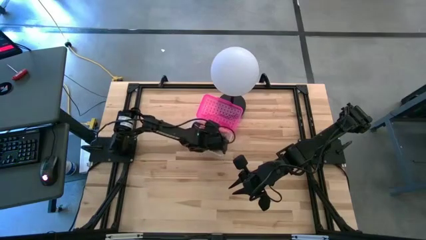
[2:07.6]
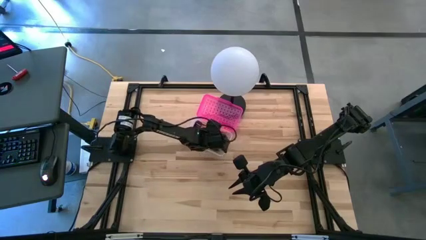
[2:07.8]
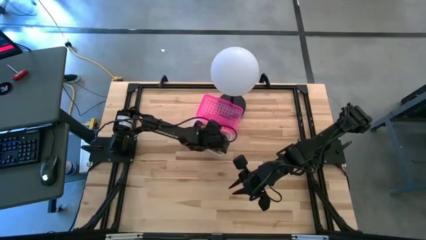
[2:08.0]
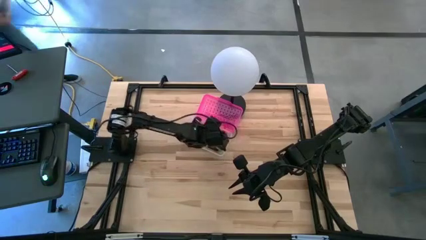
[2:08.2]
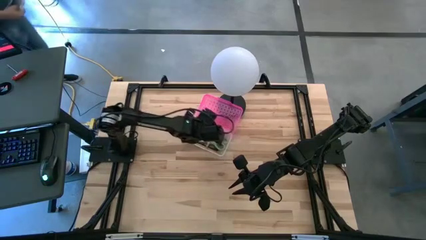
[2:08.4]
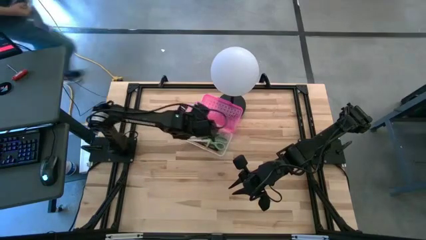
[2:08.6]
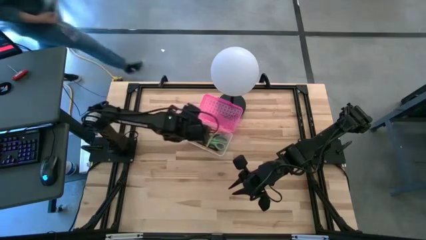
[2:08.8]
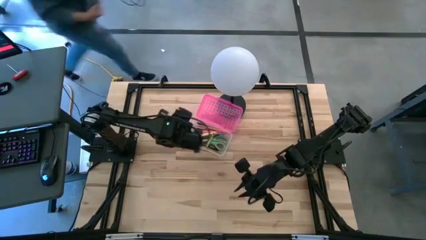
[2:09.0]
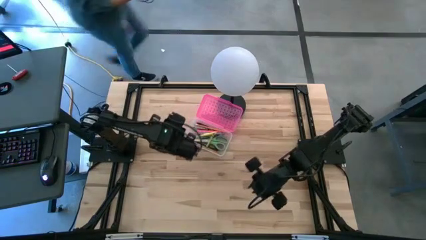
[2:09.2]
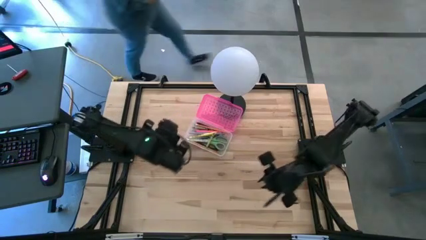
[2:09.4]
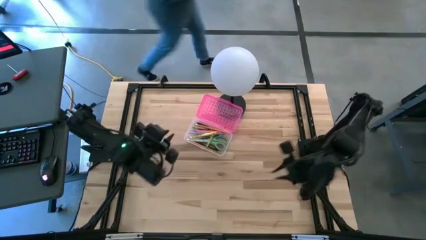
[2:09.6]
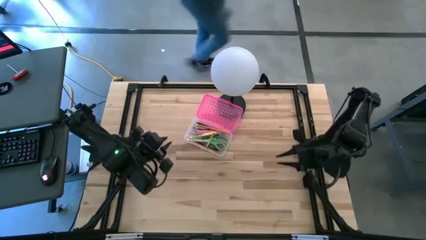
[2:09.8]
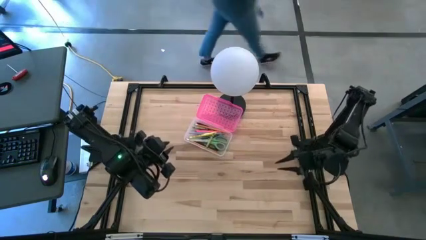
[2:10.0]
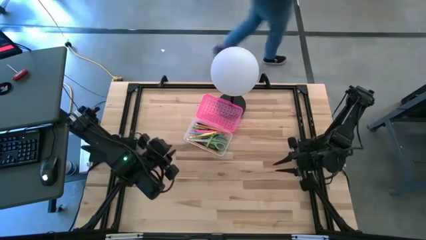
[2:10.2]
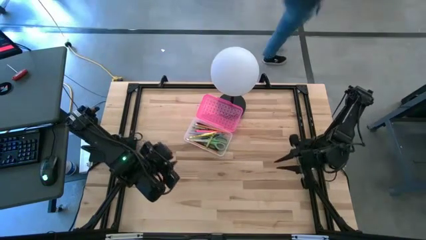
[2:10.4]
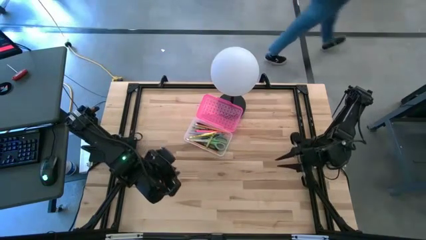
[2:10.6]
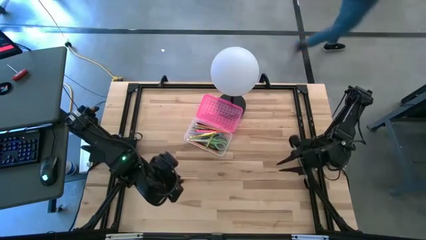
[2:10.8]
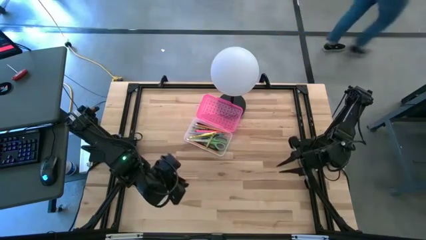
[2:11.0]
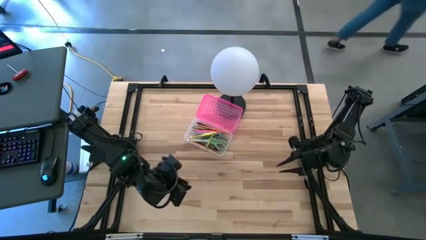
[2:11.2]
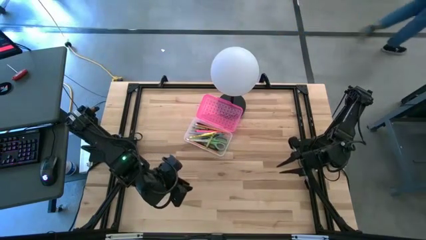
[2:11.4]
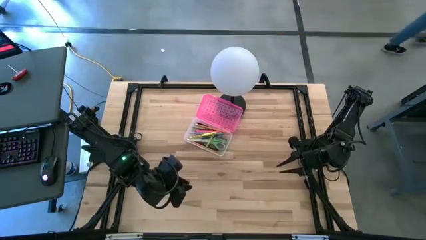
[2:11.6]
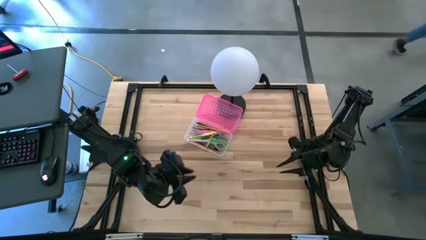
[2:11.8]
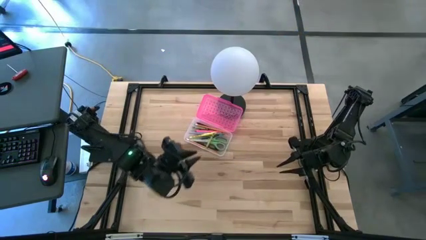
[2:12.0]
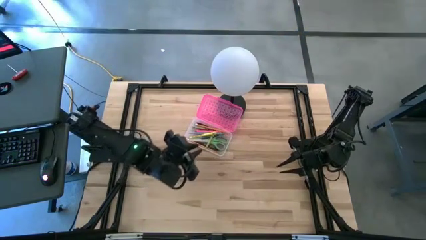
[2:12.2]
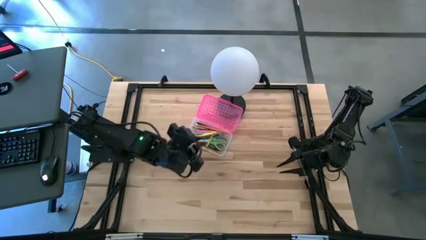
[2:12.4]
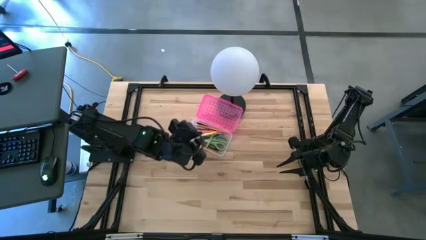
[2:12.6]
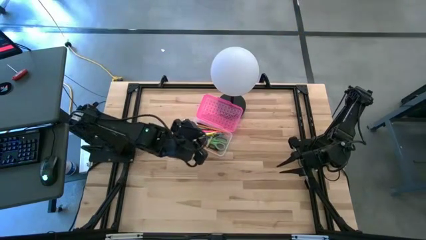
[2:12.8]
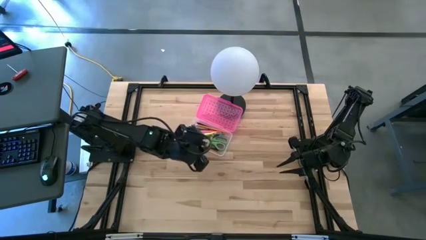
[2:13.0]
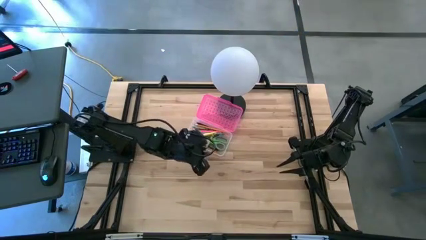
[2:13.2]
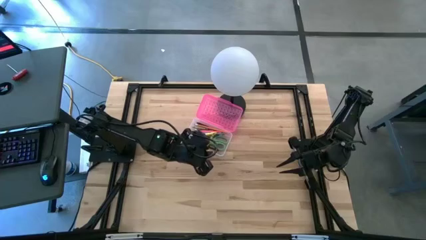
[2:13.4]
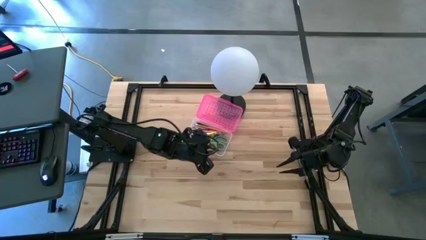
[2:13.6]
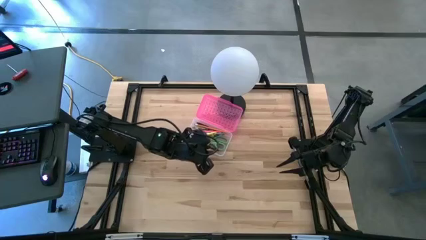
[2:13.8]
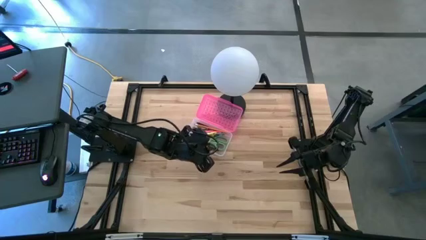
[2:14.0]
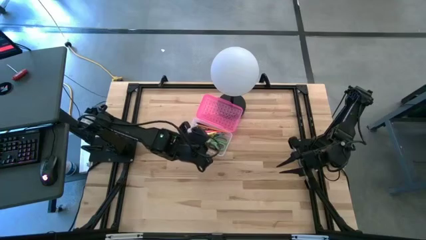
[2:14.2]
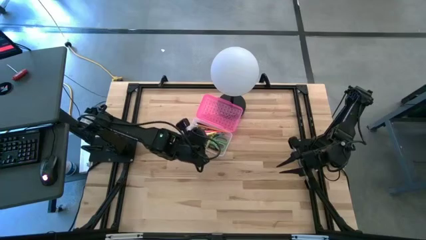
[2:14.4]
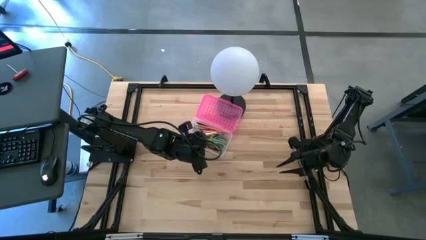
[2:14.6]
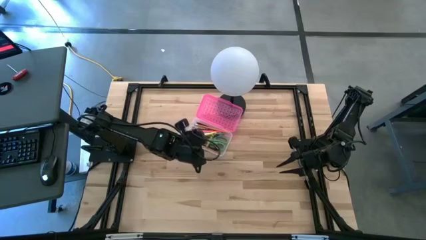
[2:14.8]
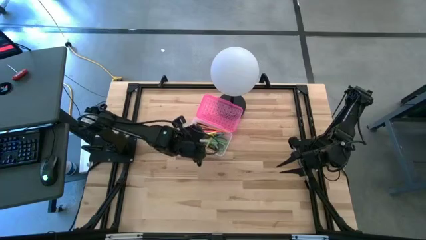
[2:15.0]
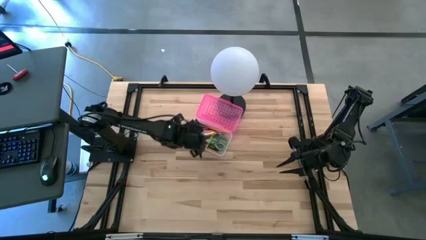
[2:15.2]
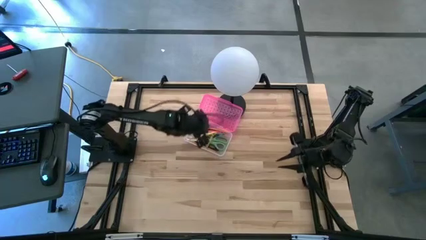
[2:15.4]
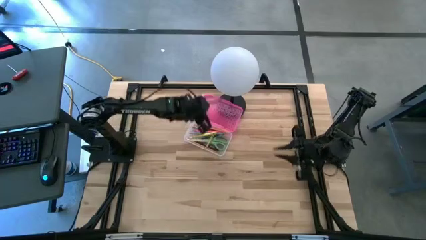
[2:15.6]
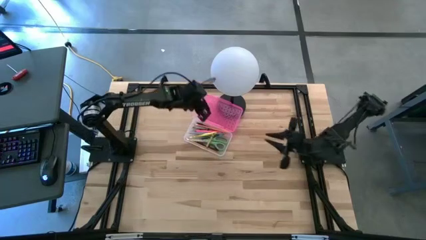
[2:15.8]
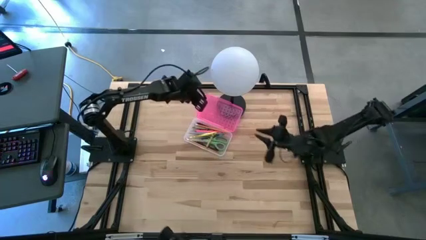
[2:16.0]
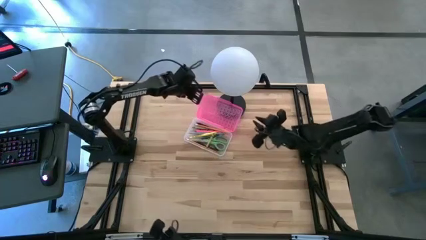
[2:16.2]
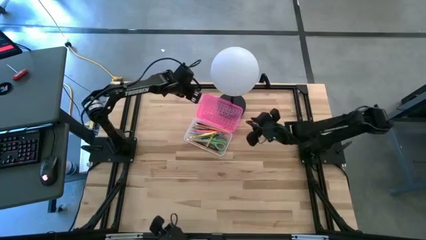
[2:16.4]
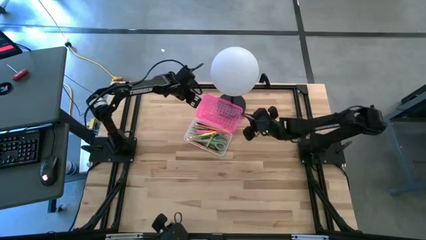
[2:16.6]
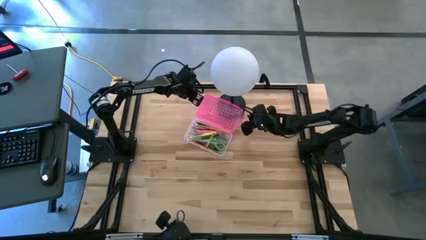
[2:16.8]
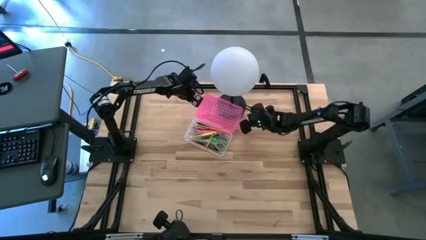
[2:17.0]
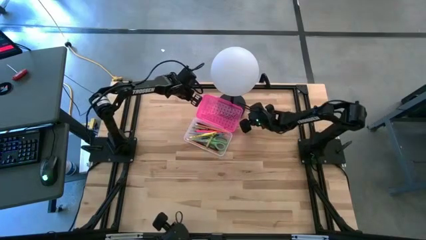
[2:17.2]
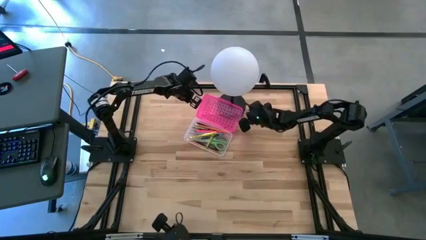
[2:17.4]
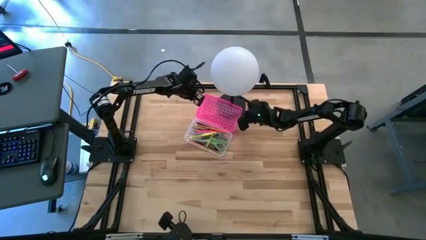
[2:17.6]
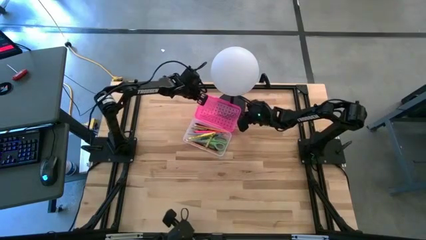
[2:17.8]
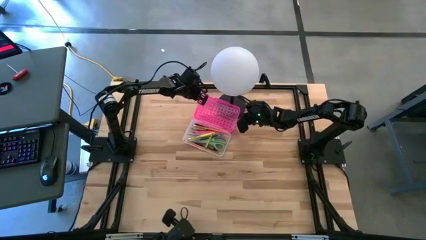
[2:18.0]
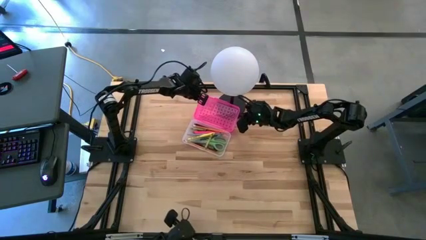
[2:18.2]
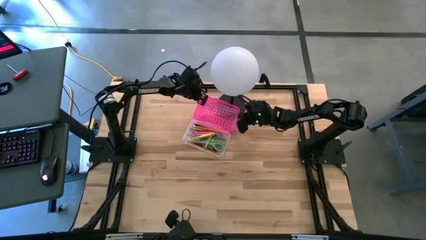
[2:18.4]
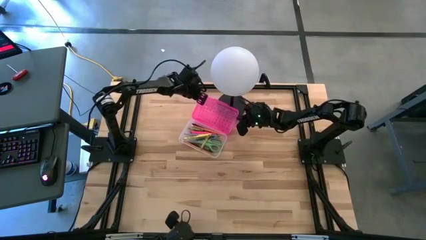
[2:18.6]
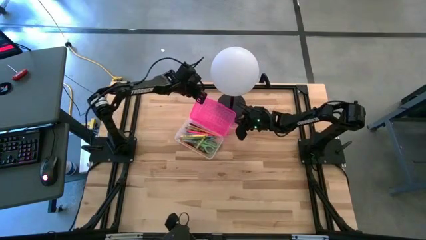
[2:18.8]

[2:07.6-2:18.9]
Task: Pick & place school supplies into a supply box
Close the pink supply box

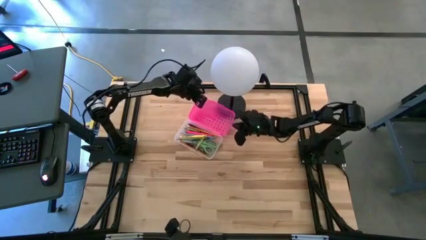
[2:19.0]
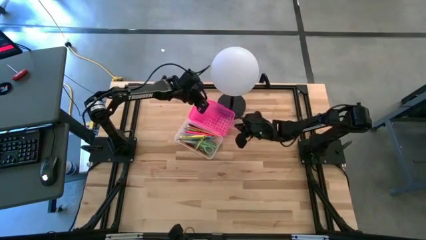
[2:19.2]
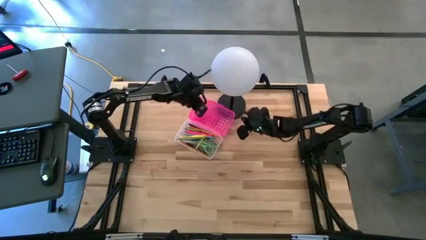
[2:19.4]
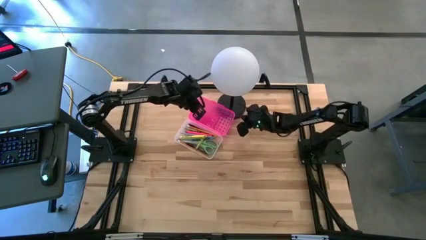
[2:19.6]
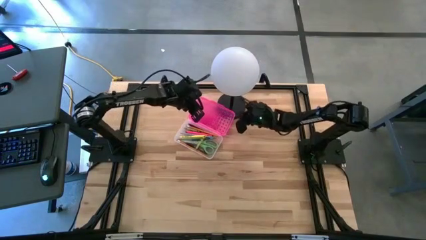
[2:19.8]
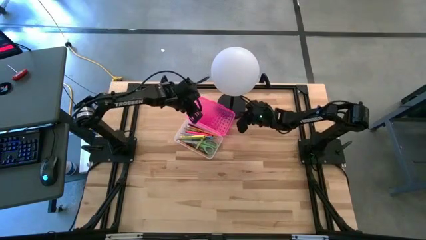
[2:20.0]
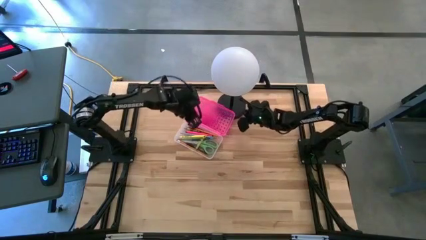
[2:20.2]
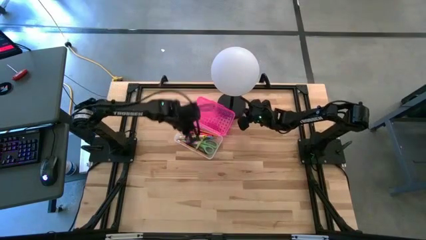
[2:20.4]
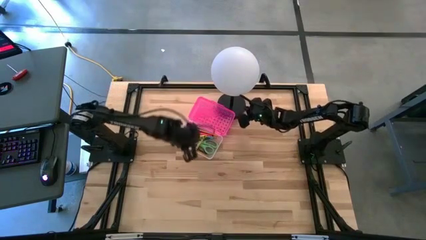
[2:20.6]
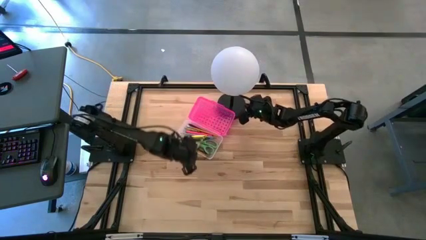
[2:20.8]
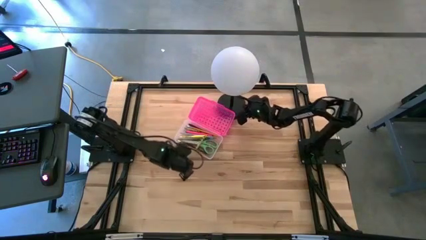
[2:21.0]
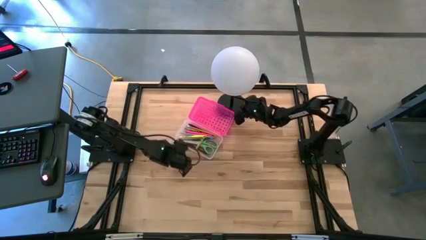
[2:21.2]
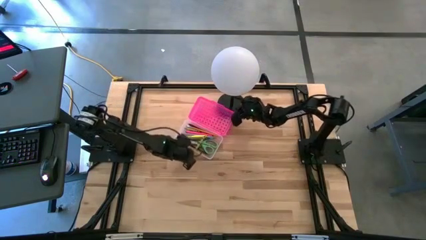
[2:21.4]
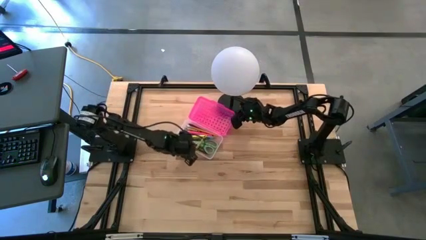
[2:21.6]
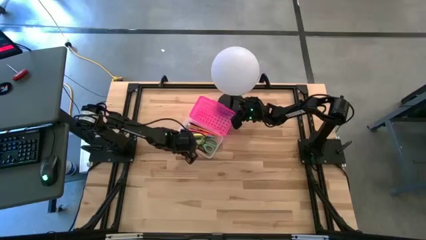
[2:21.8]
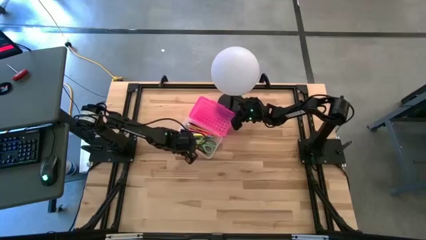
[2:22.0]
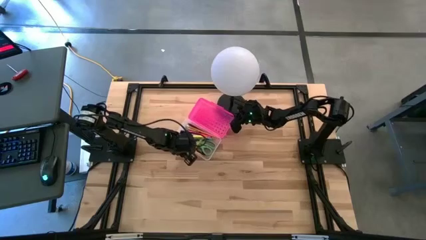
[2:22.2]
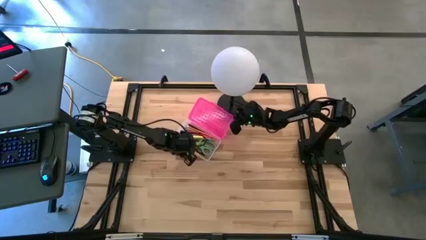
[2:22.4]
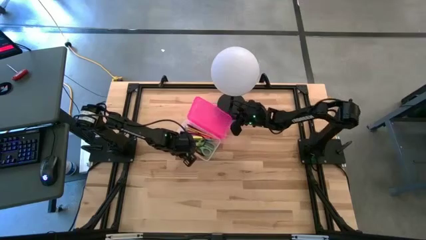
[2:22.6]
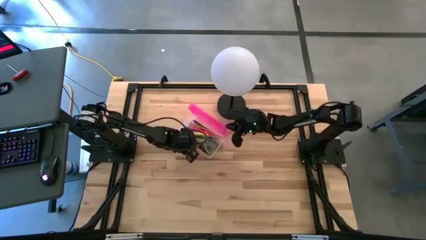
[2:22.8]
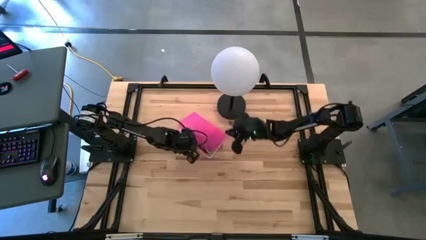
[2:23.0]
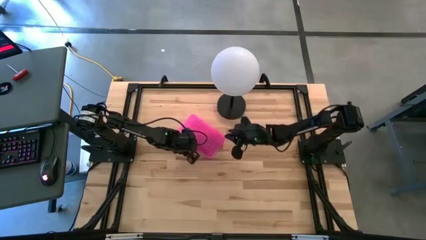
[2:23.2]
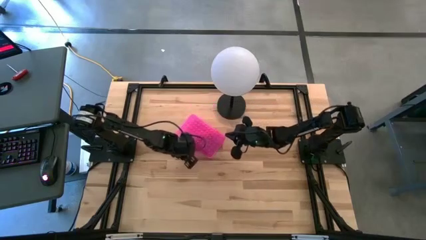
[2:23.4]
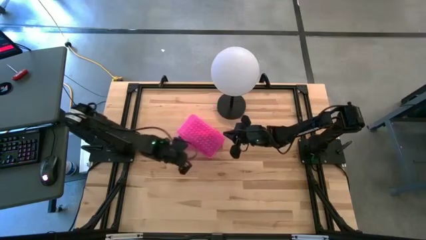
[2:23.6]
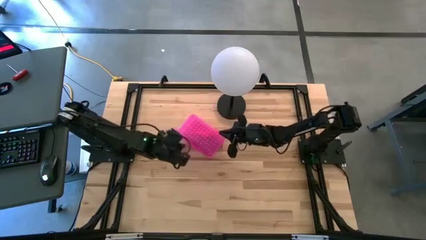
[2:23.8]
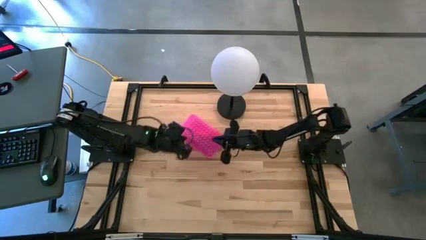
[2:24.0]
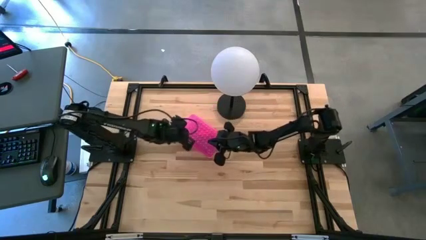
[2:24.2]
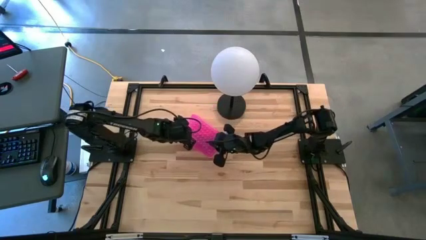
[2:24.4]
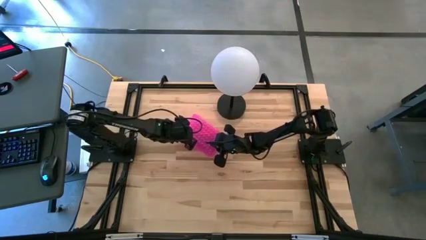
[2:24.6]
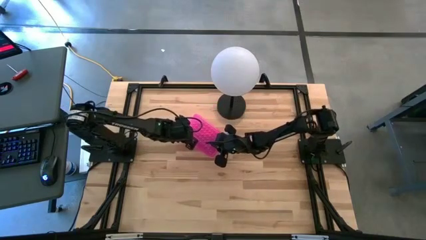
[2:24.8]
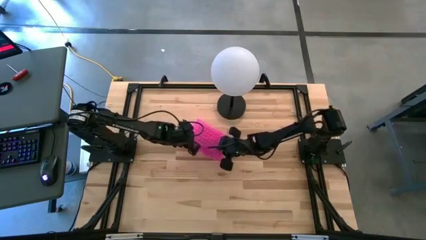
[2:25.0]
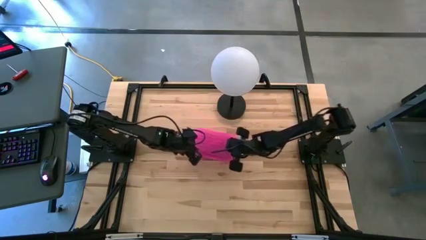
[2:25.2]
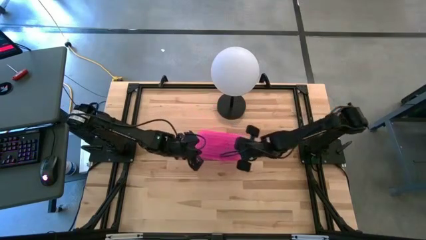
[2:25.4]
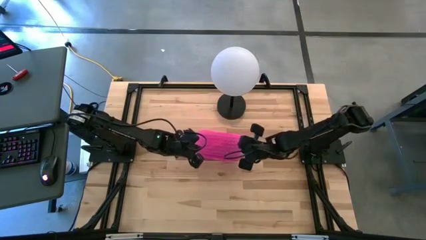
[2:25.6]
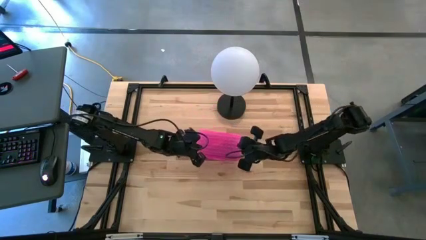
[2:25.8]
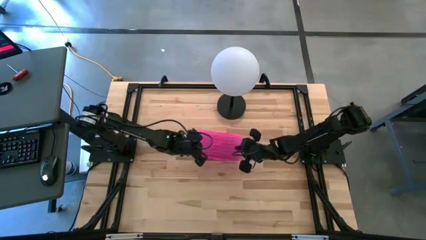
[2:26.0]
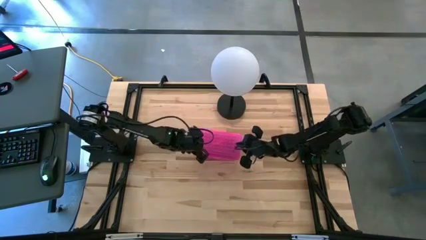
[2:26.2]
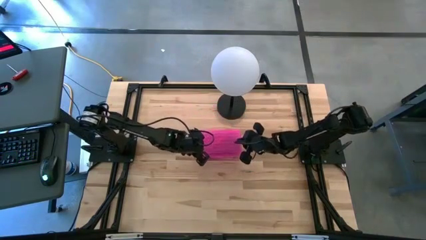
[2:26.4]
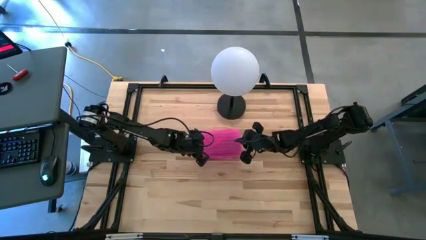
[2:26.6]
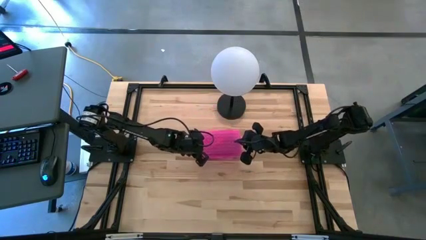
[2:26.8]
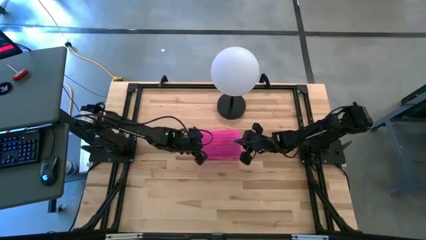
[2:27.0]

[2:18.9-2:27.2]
Close the pink supply box
